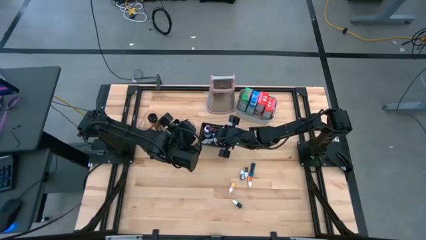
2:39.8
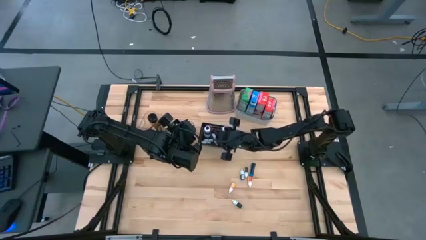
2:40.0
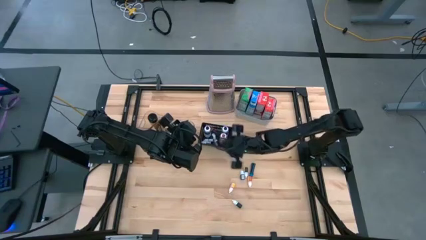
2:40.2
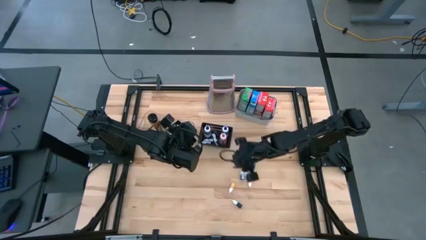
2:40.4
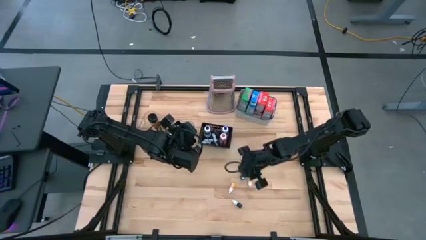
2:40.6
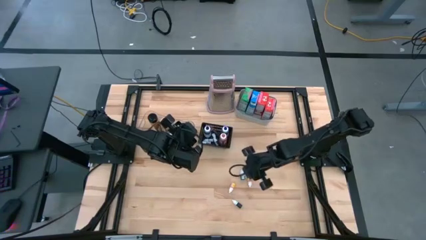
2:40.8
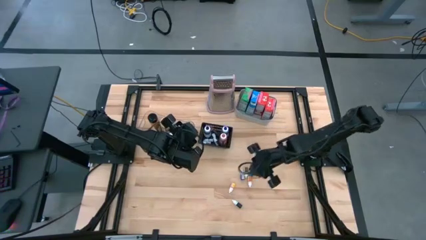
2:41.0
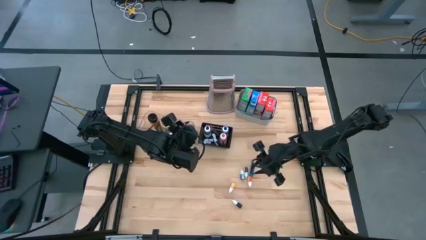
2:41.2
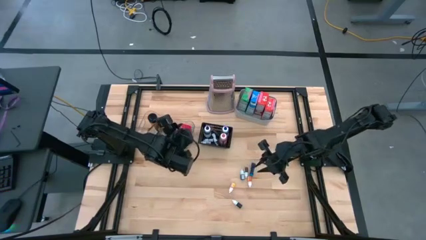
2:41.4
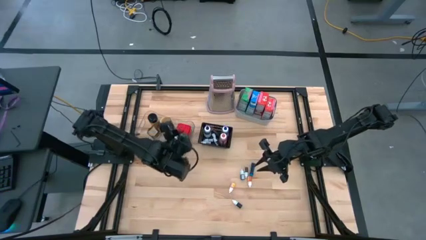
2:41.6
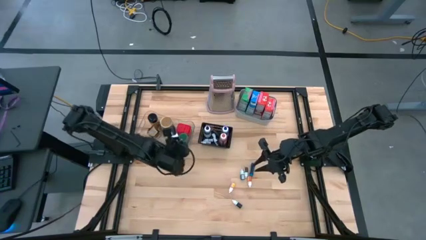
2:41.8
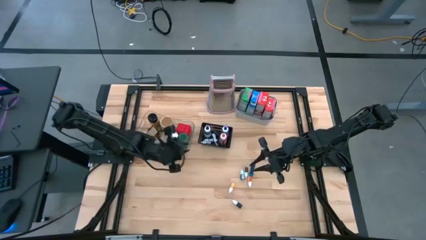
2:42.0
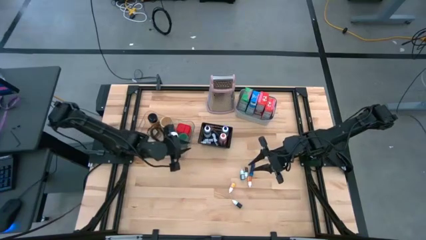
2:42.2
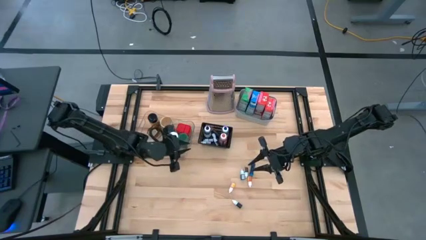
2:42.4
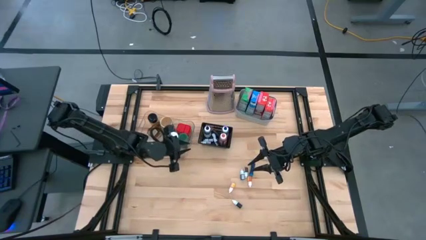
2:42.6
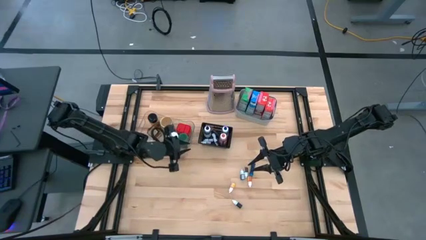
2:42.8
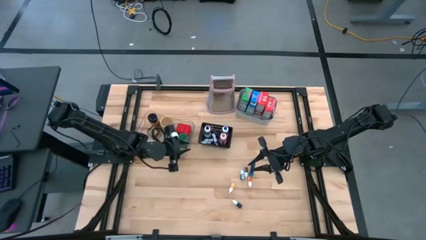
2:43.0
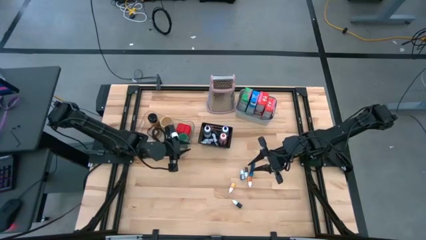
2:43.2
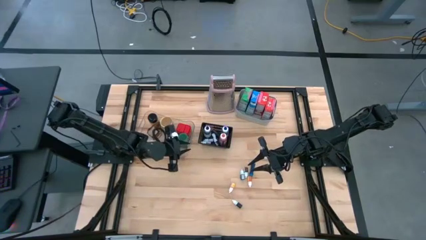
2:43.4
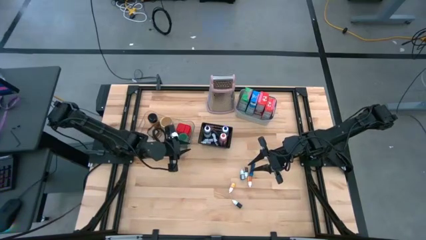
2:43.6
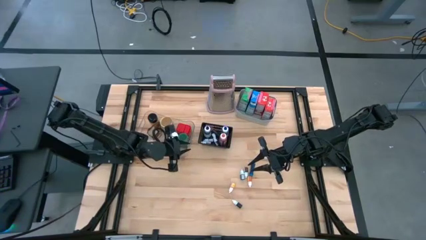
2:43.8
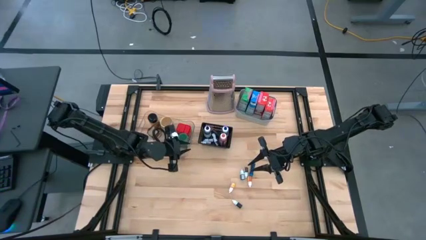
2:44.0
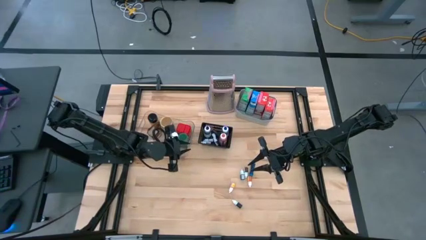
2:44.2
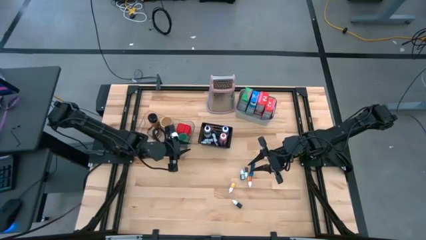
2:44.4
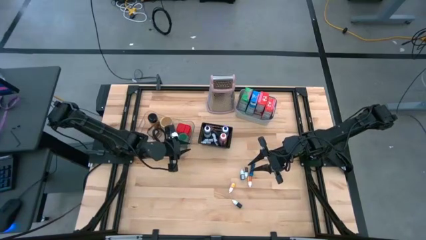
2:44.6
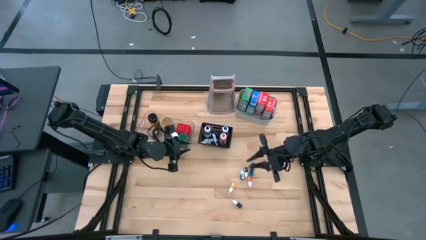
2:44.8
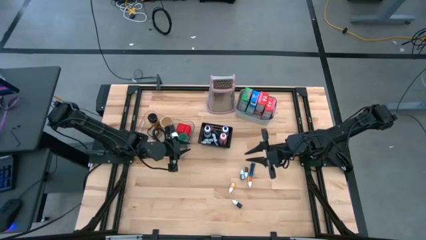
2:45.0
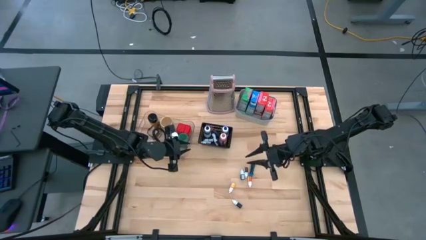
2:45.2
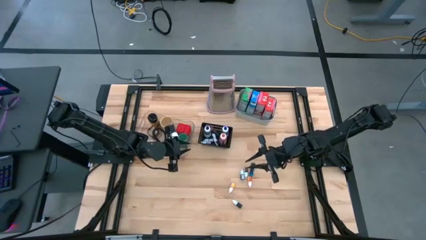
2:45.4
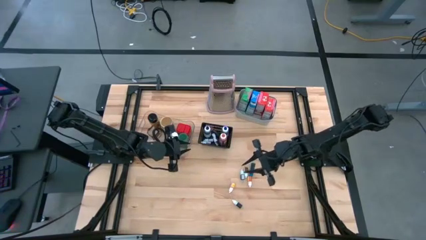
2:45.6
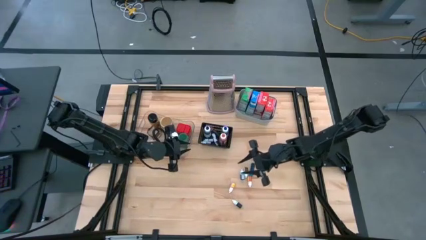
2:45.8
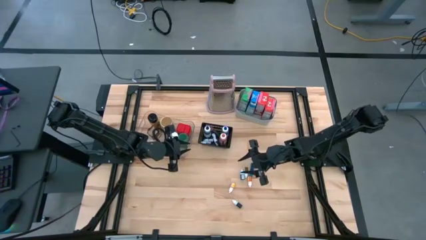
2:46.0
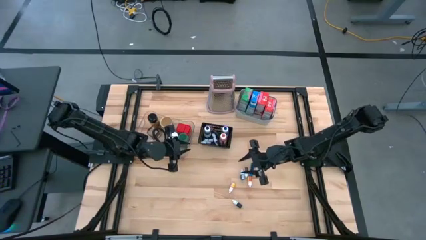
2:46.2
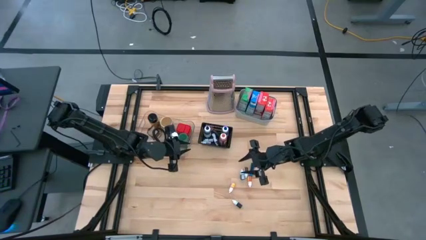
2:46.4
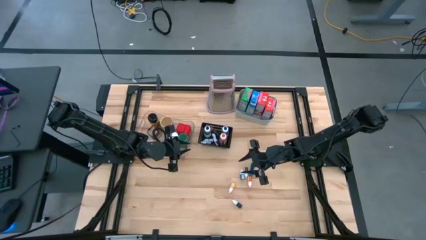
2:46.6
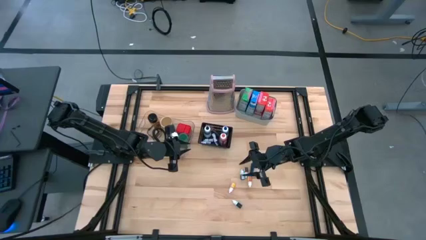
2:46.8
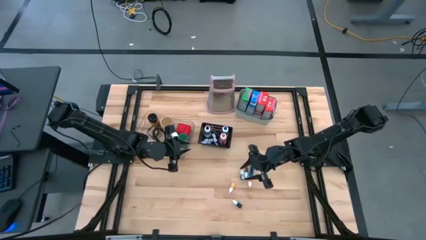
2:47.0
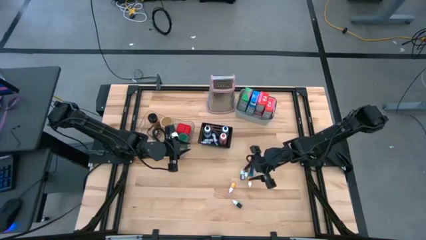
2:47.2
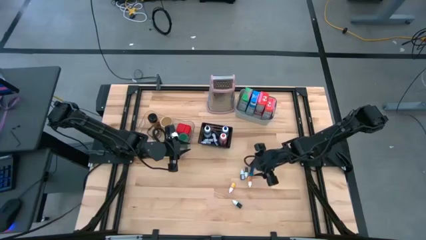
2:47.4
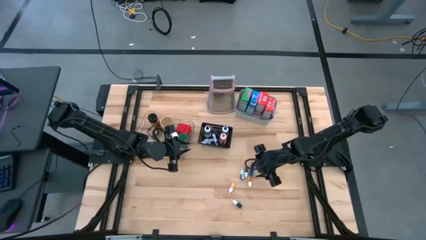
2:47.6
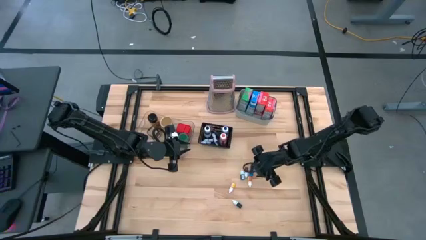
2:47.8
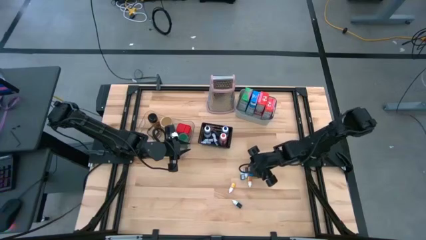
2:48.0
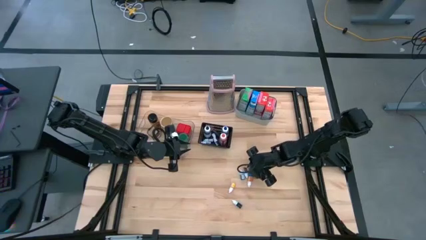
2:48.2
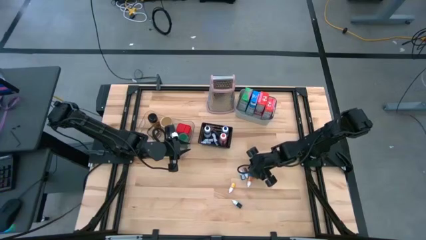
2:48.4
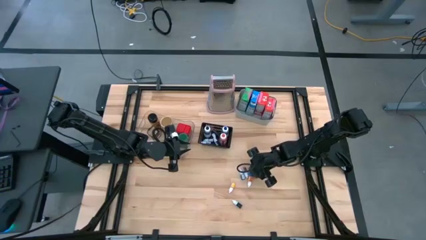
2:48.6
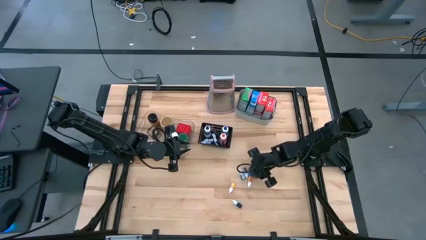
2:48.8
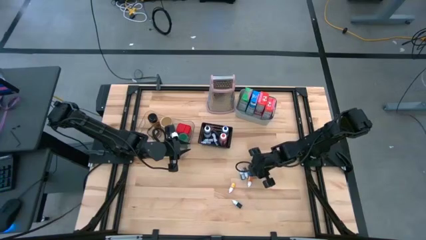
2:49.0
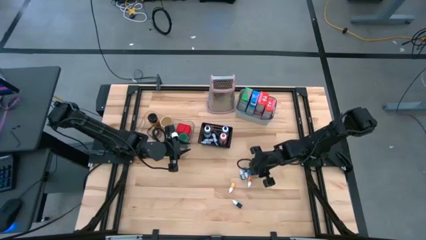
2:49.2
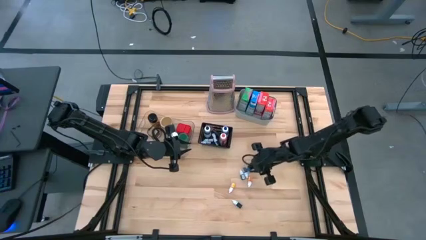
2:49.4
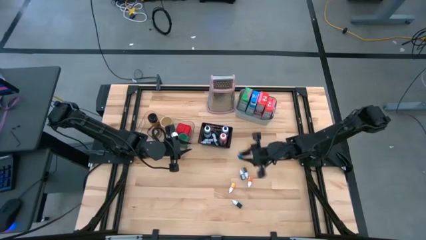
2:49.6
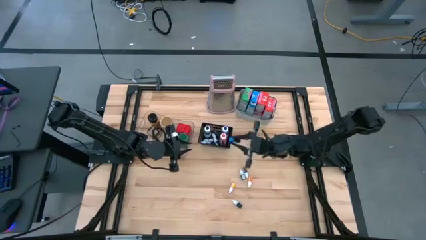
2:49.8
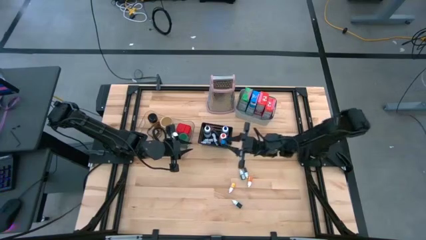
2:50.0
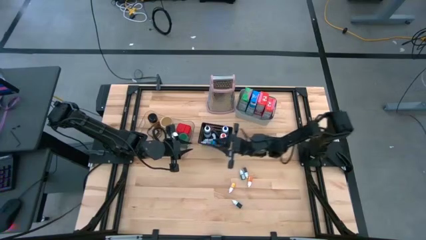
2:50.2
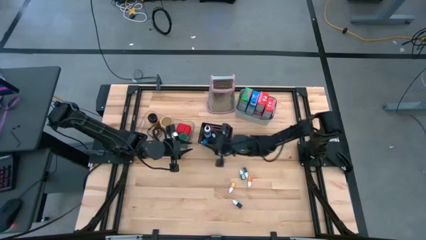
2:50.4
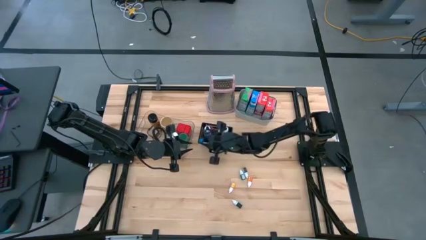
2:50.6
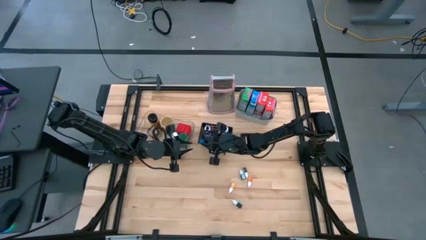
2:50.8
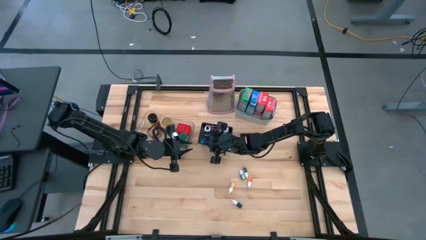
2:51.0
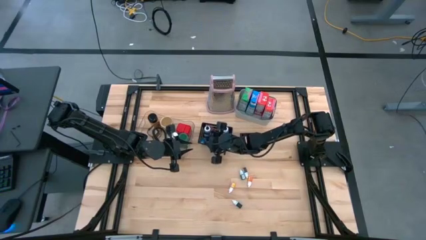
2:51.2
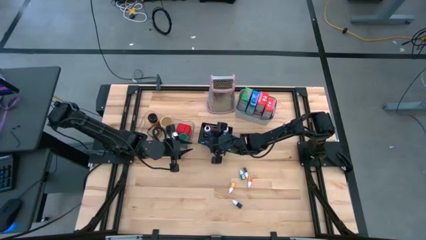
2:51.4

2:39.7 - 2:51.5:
Task: Pick & Place Kitchen Items
Put the small blue food coloring bottle into the black bin

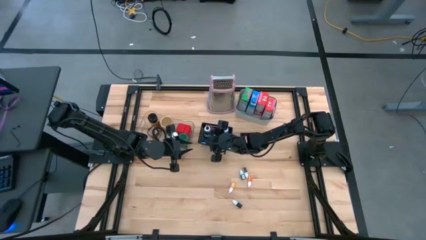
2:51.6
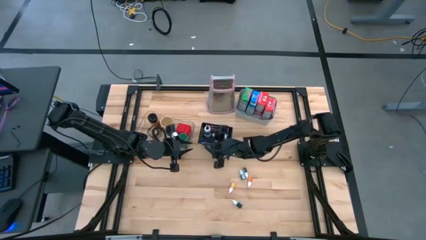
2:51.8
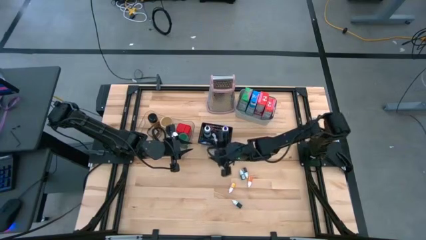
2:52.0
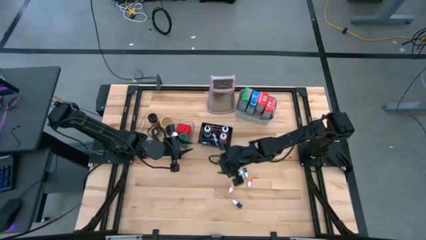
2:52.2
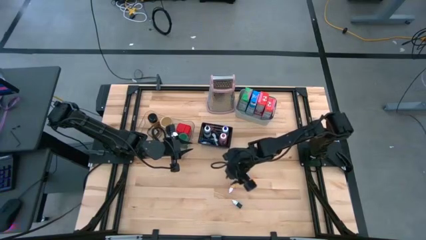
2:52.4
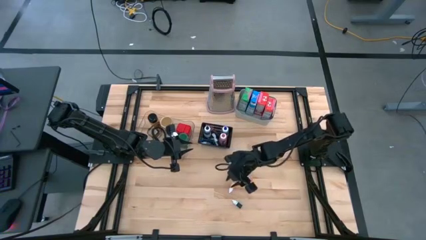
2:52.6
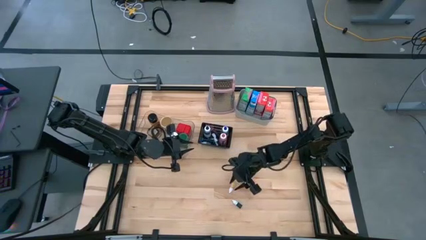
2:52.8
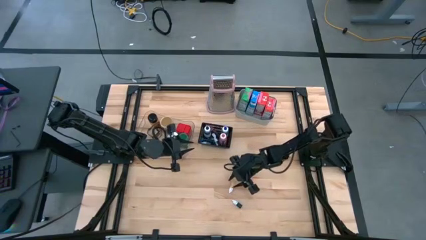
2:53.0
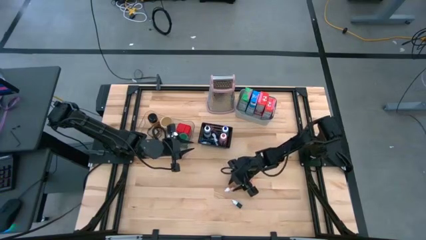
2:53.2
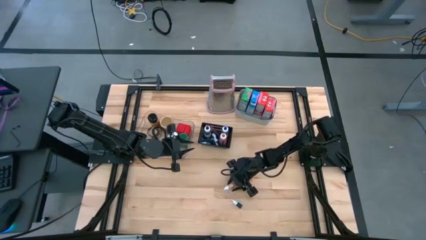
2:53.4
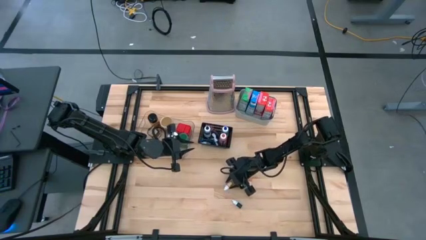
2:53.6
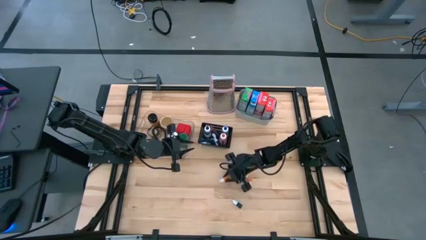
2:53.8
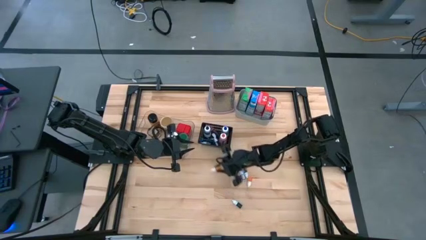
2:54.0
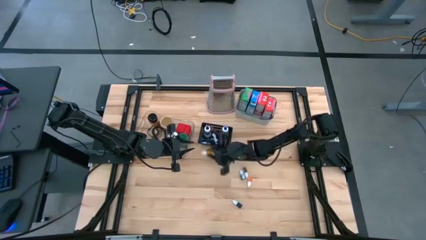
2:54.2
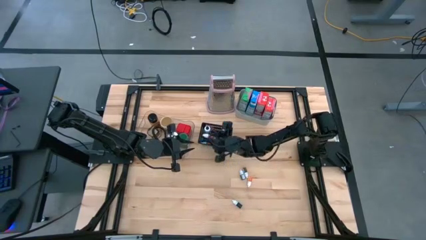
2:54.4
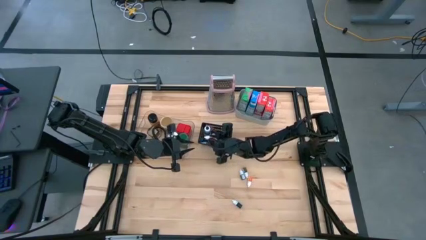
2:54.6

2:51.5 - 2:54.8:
Put the small yellow food coloring bottle into the black bin

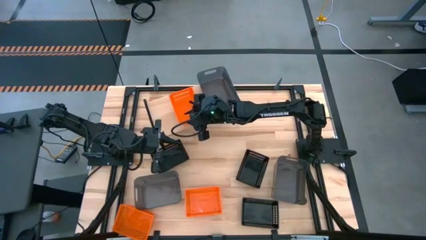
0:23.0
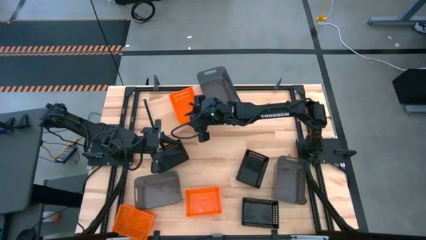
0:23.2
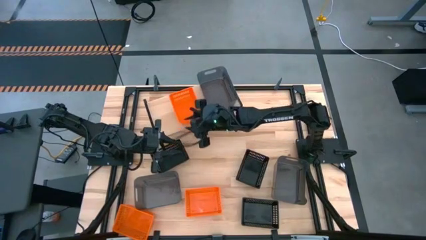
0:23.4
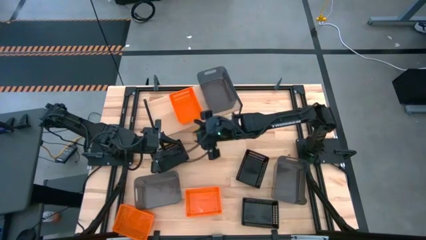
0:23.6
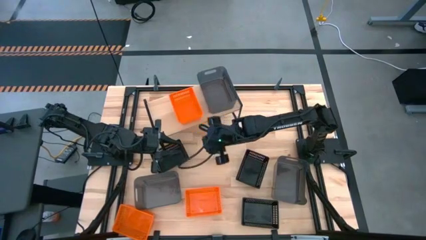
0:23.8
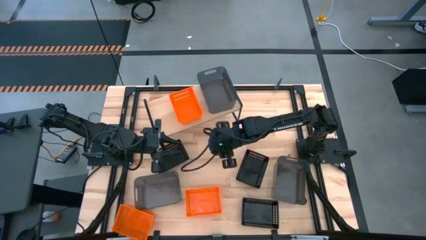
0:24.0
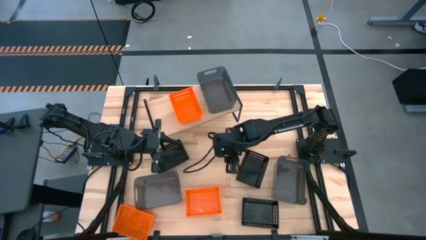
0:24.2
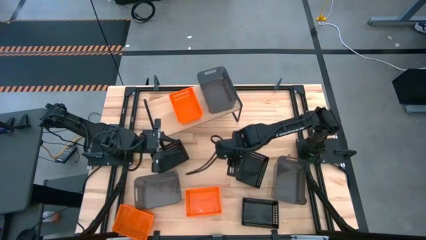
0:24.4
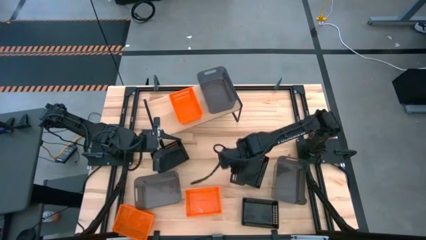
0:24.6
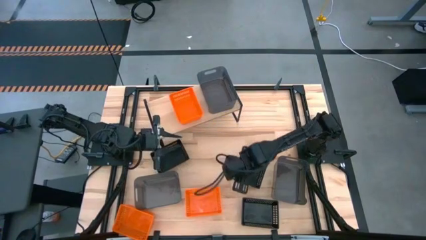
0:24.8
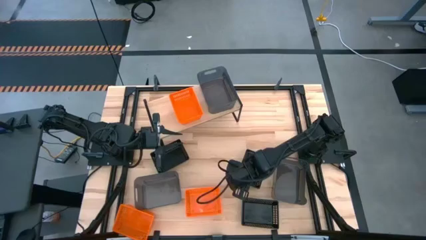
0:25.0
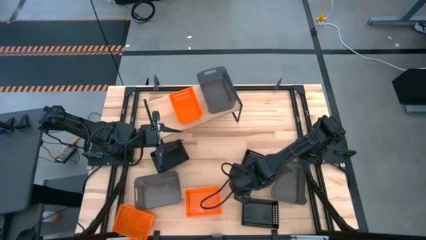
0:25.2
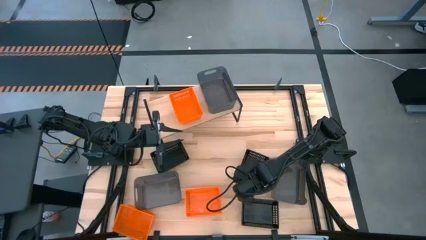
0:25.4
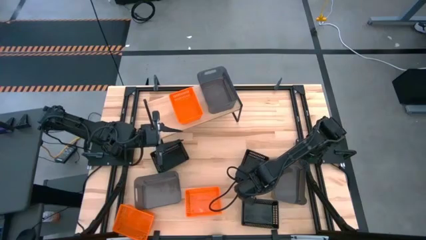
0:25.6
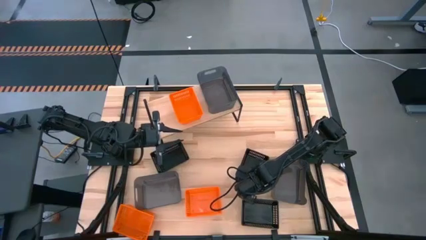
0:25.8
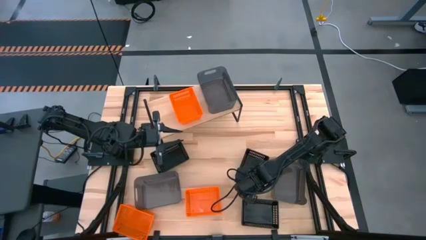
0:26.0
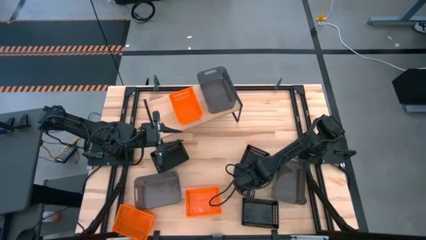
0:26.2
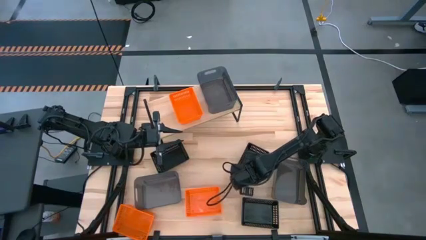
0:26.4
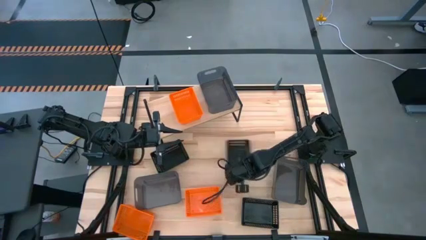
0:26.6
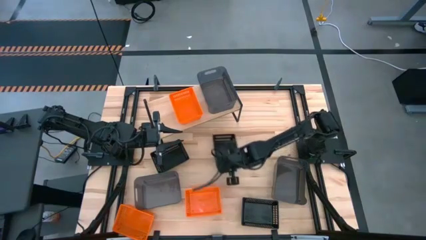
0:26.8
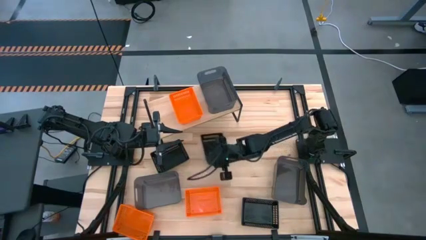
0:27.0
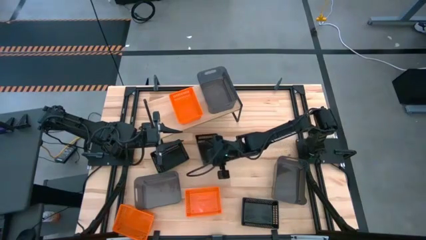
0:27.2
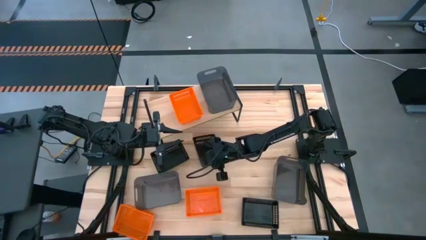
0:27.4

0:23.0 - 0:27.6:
Task: Stack baskets on shelf by color
Move the black basket to the center of the table
